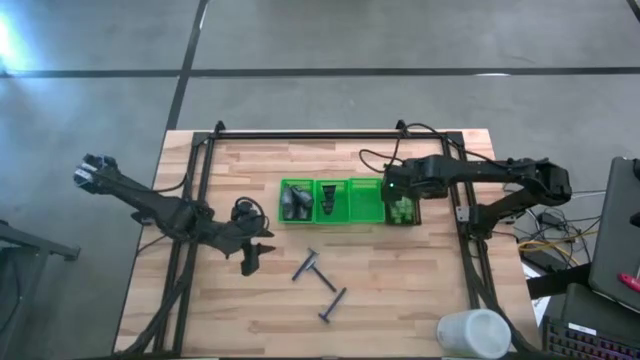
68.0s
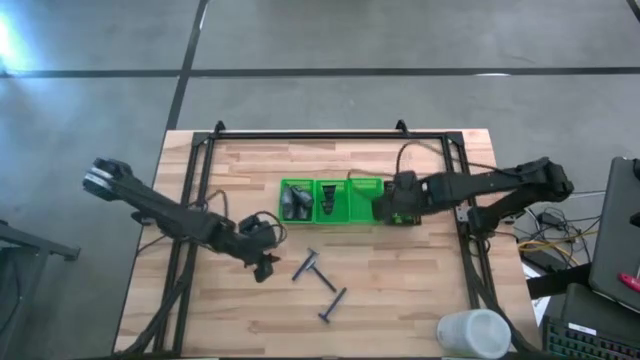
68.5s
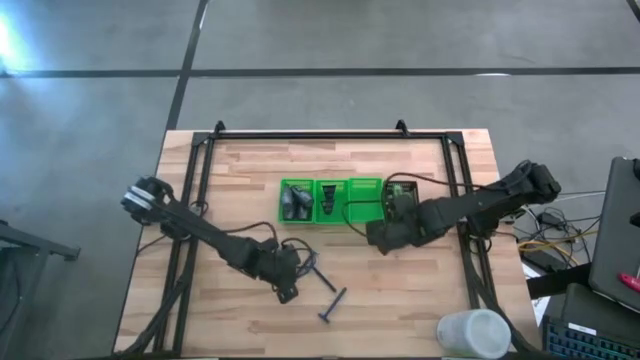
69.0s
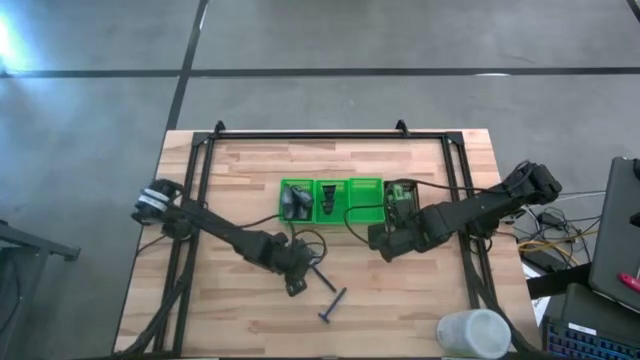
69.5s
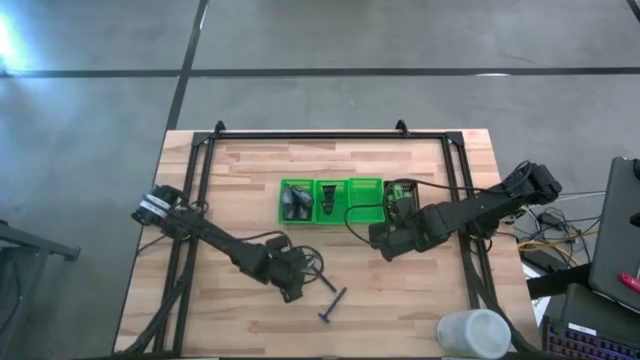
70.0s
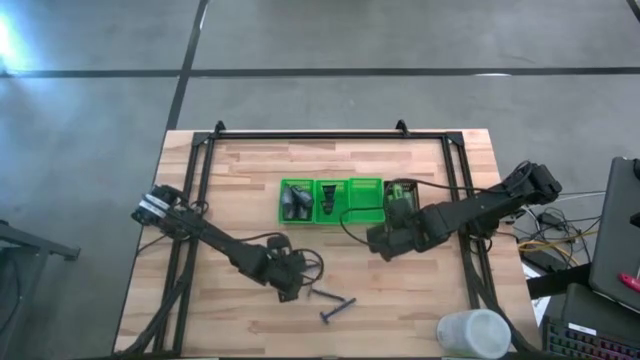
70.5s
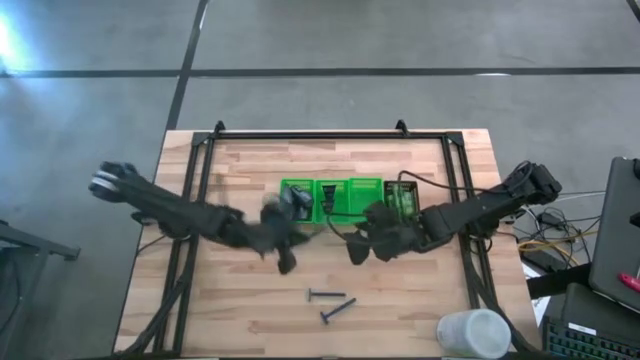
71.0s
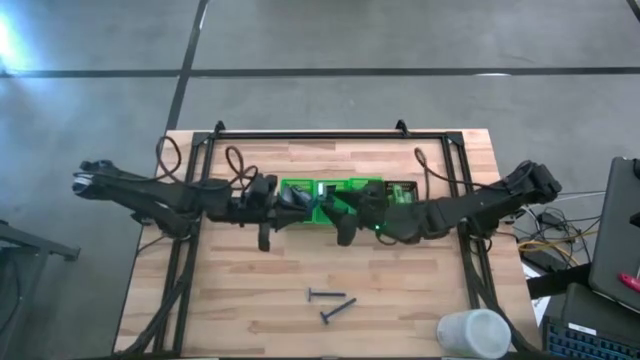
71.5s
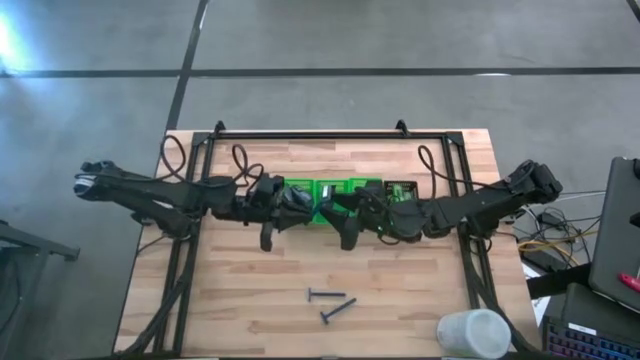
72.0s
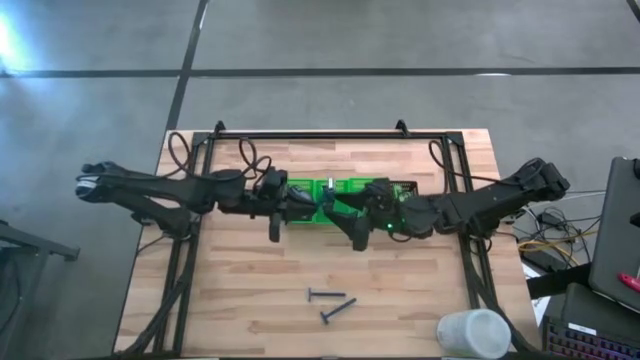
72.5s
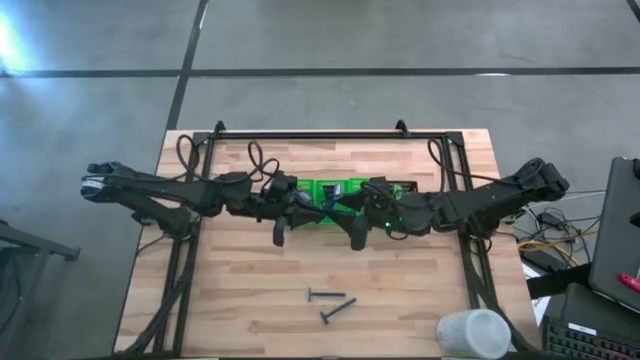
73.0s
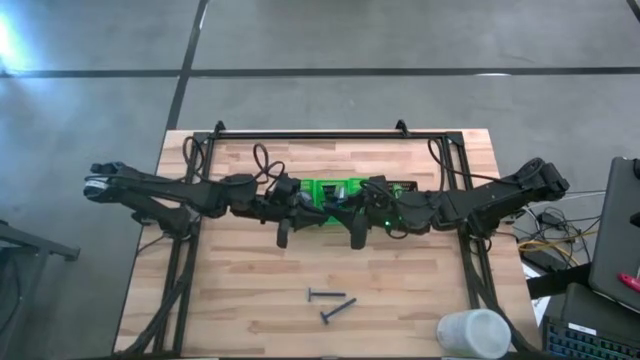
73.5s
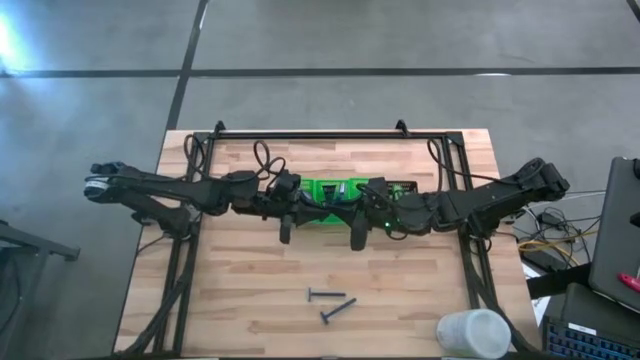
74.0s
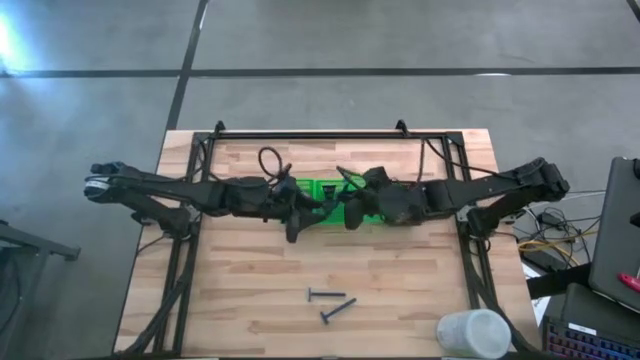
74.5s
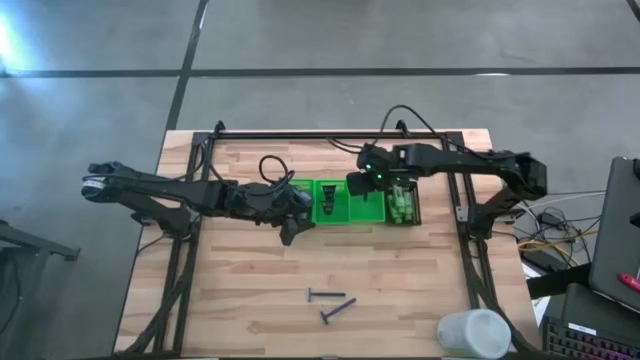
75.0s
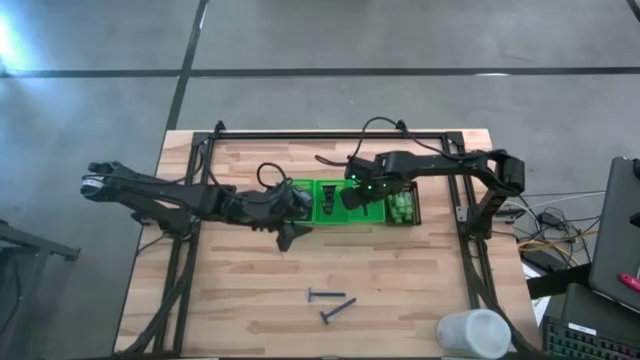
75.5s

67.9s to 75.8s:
Task: Pick & Place Travel size toiletries
Put the razor into the right green bin

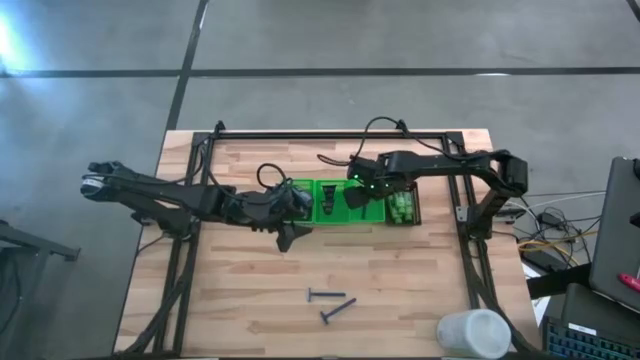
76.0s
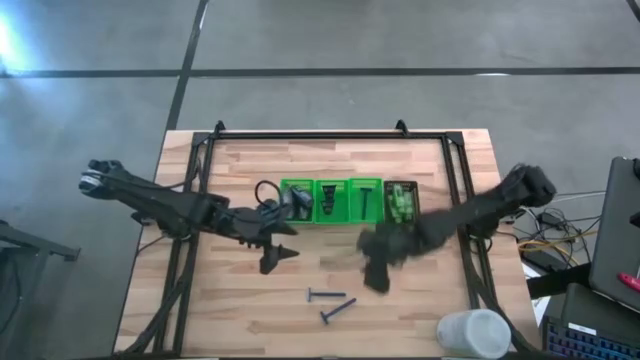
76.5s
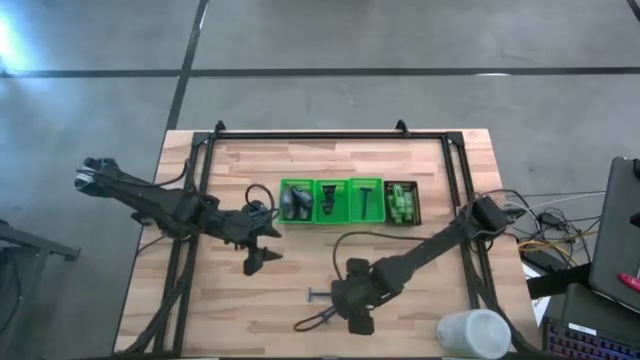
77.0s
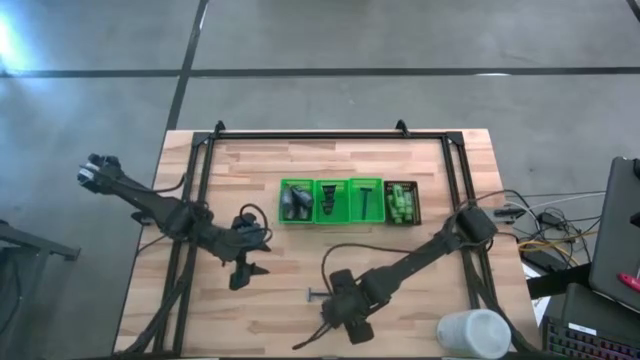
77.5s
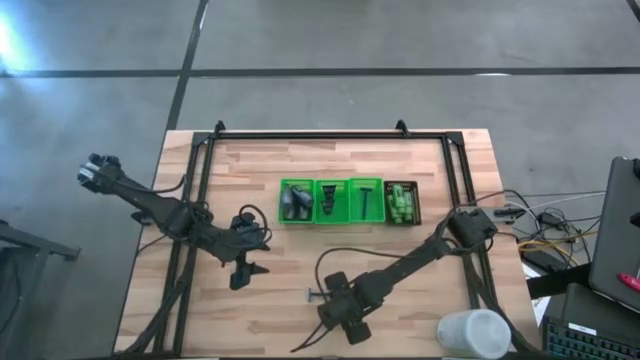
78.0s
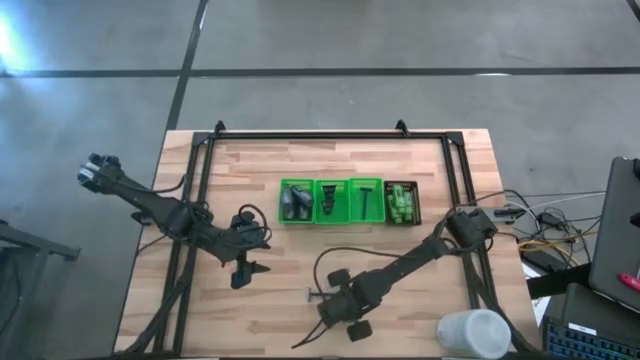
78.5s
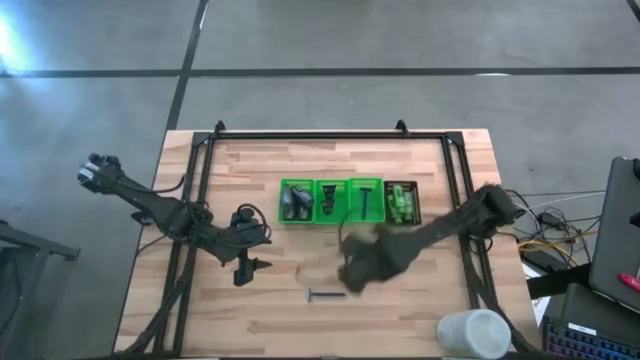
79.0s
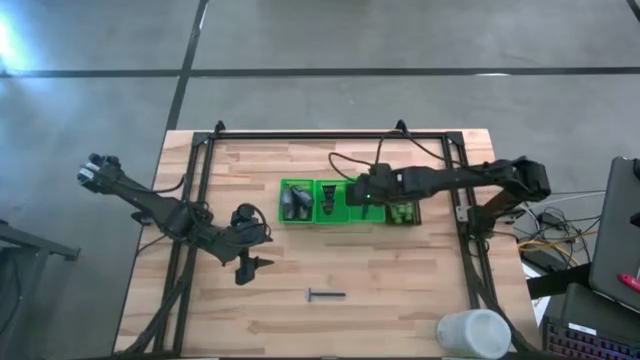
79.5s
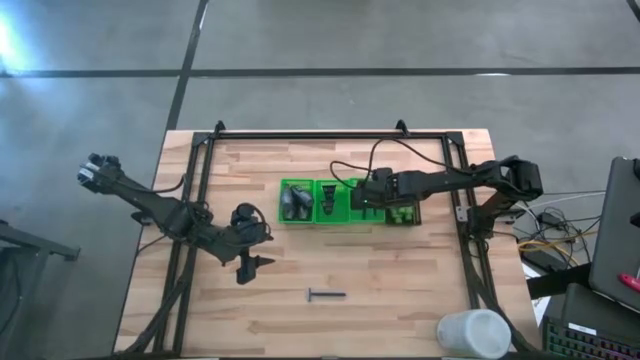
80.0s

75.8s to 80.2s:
Put the razor into the right green bin

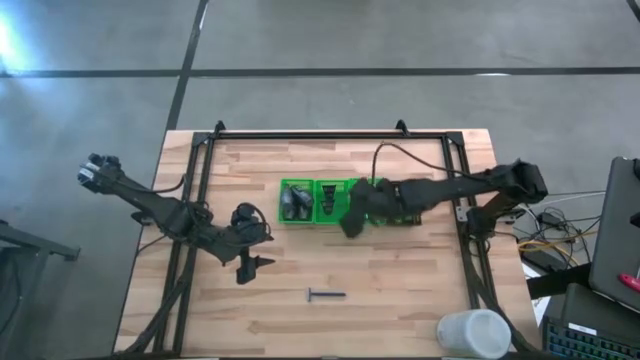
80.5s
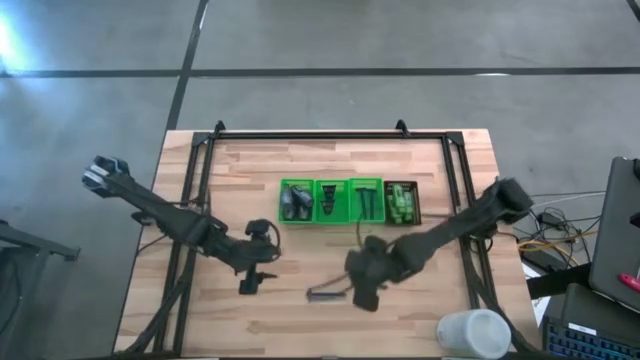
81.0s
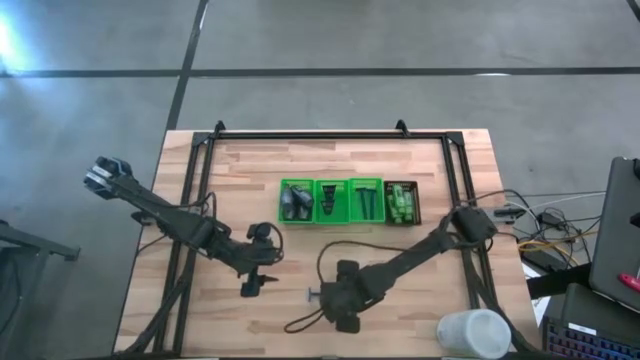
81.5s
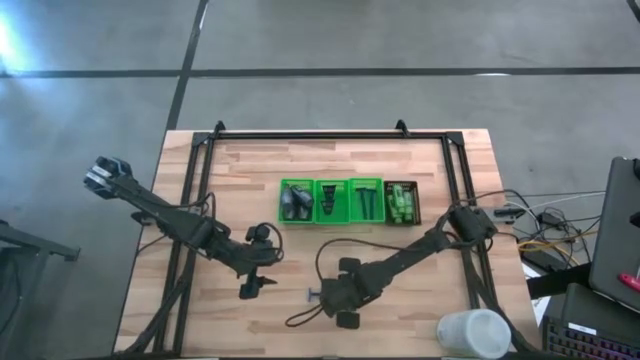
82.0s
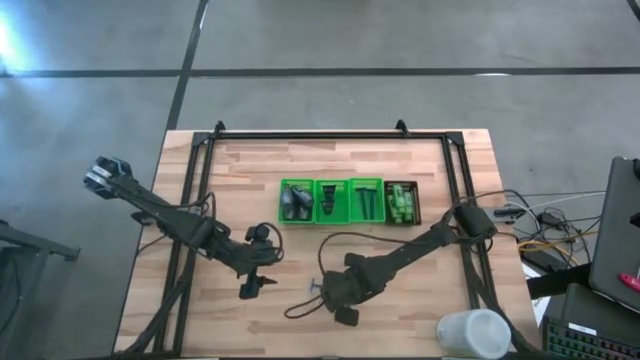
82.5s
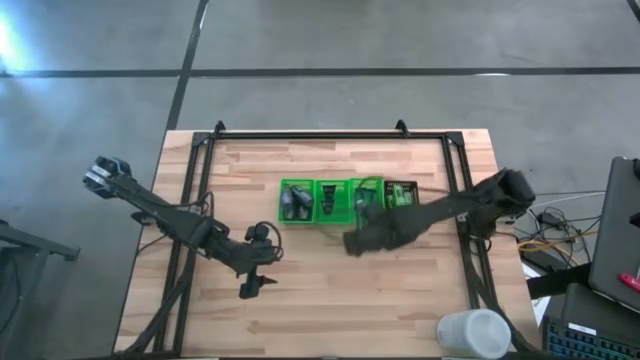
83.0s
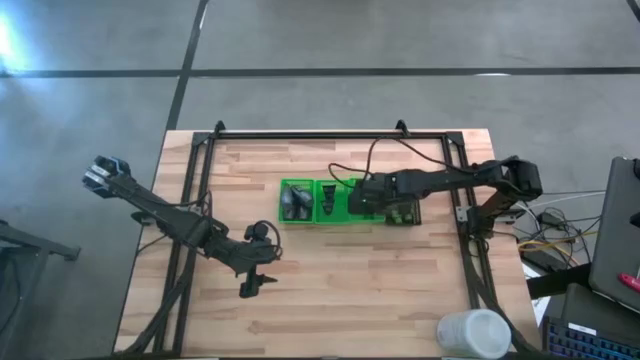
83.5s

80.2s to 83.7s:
Put the razor into the right green bin

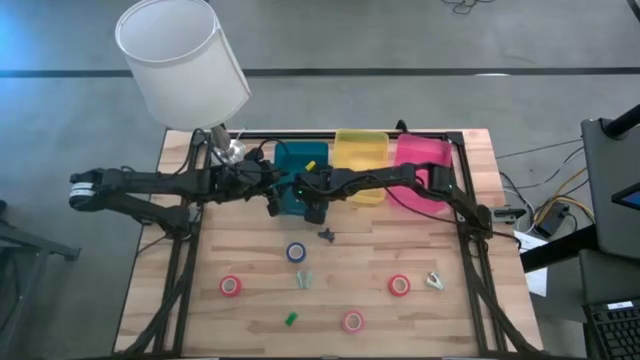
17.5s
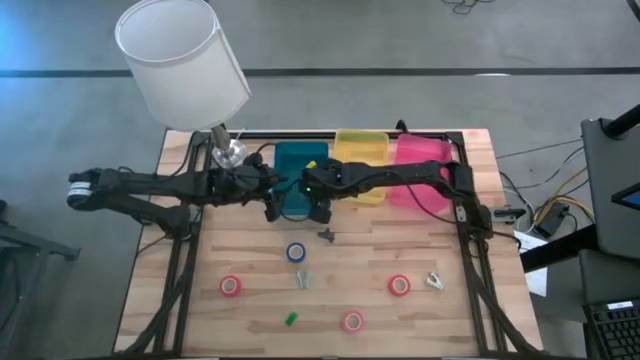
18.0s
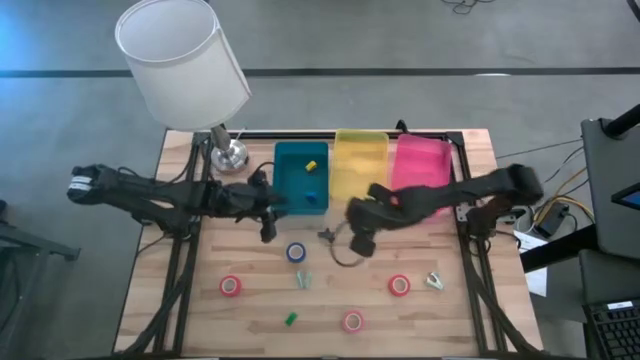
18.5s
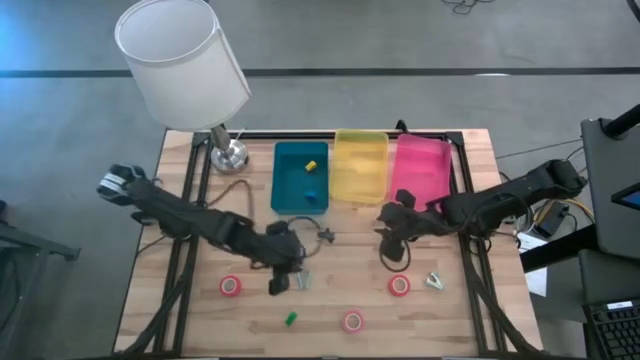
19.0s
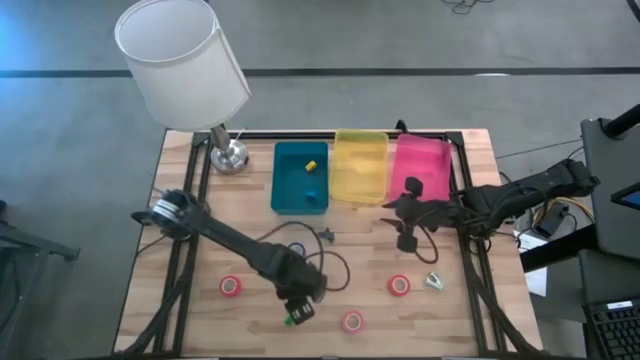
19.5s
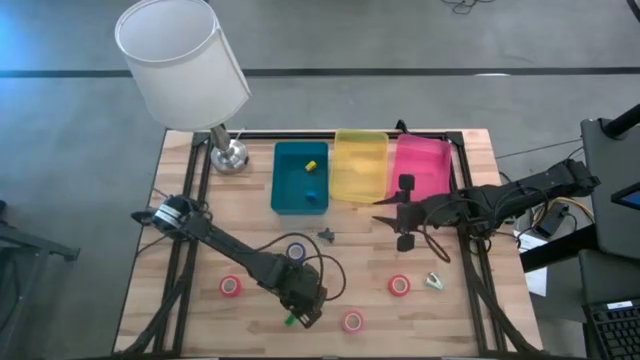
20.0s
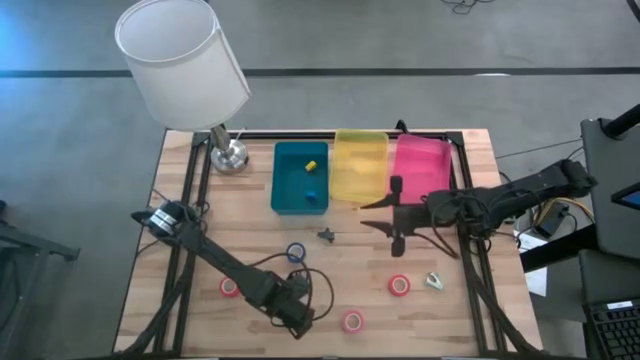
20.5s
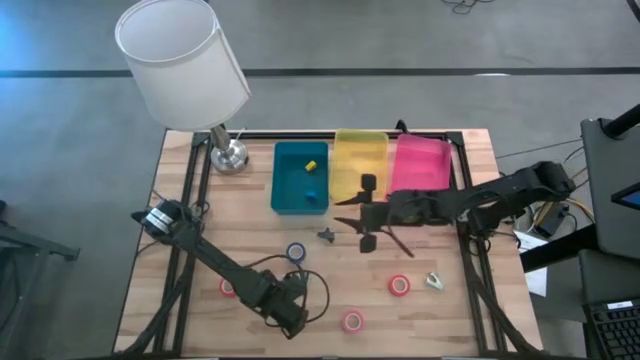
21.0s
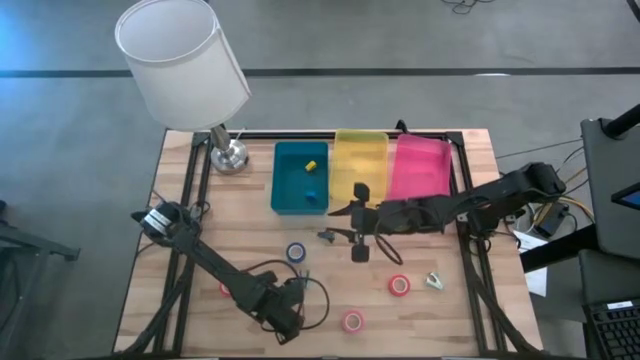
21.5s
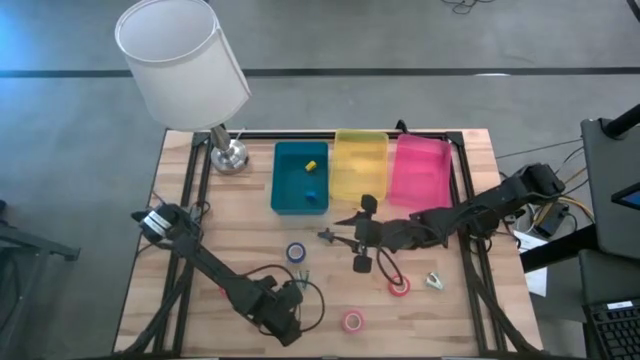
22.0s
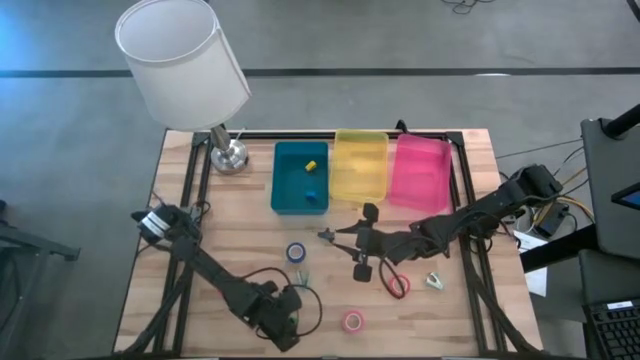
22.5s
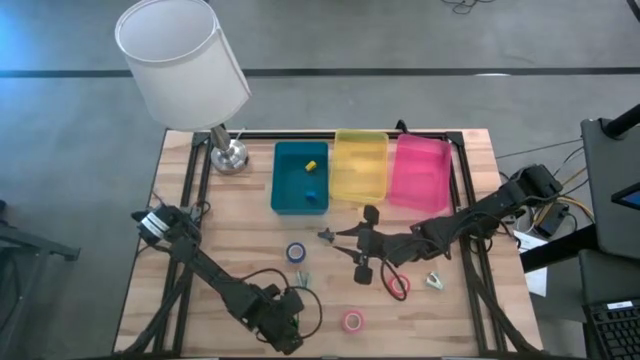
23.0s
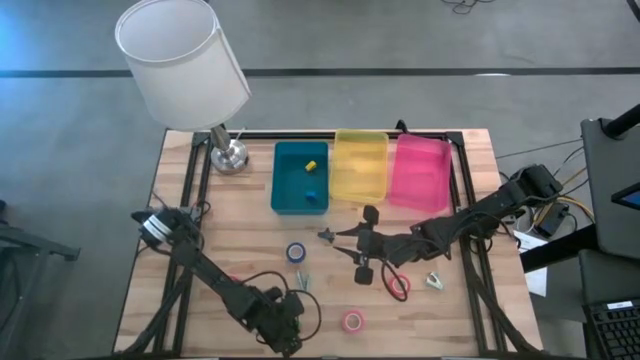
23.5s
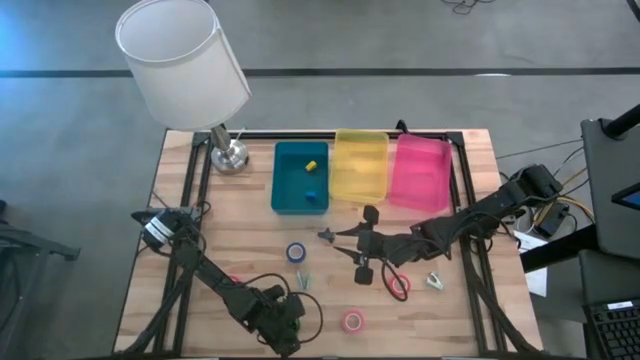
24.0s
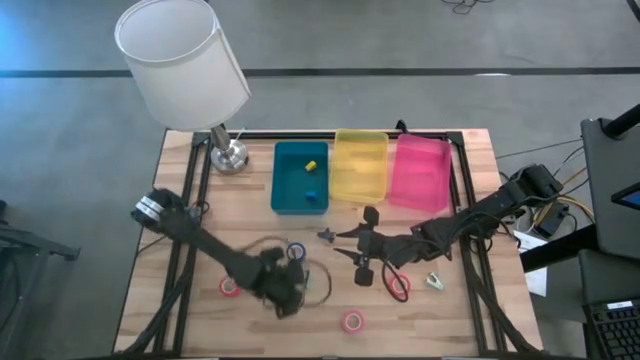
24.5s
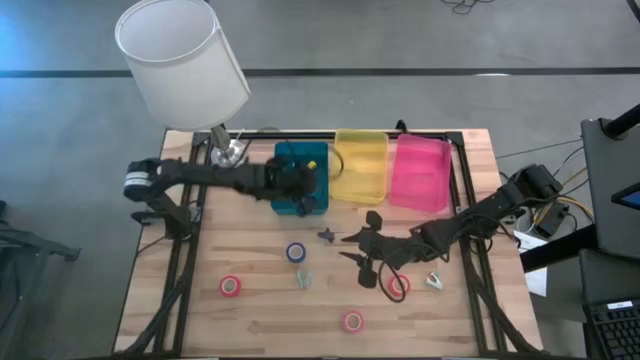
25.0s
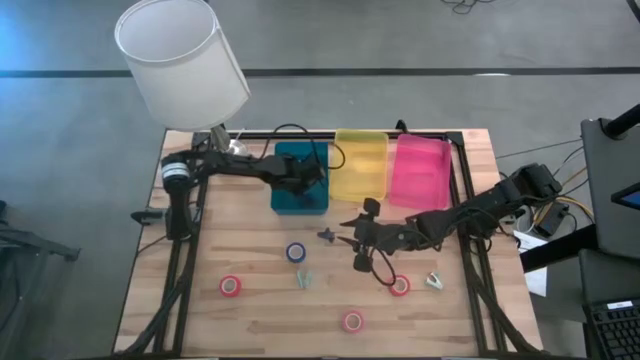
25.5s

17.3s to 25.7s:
Task: Pick and place Stapler, Stapler remover, tape
Put the green stapler into the blue bin
